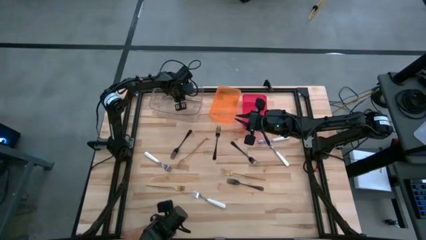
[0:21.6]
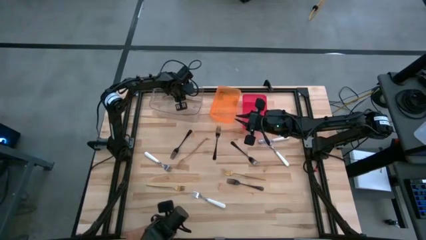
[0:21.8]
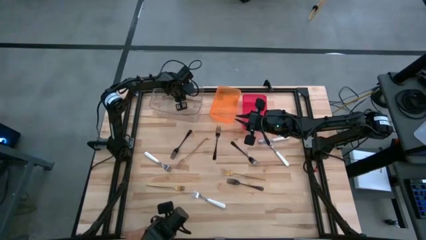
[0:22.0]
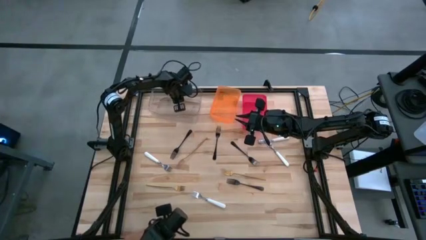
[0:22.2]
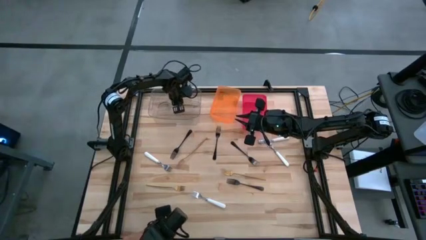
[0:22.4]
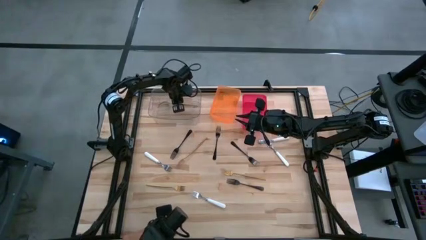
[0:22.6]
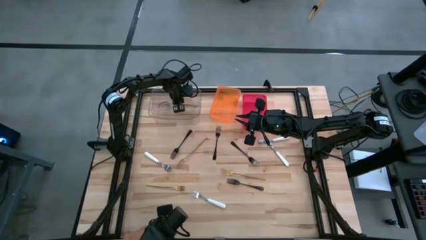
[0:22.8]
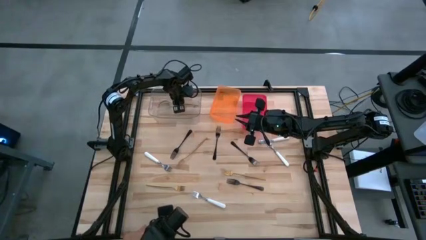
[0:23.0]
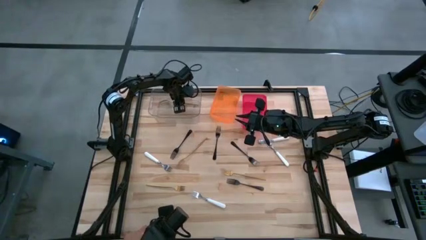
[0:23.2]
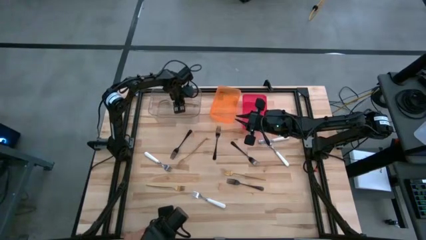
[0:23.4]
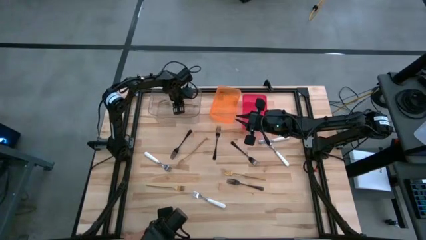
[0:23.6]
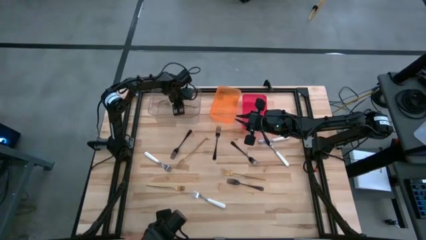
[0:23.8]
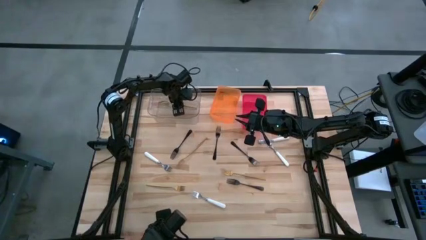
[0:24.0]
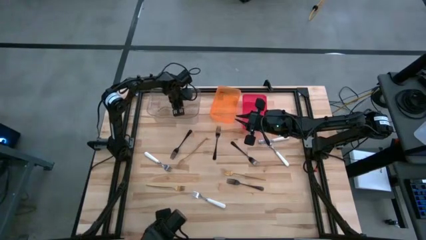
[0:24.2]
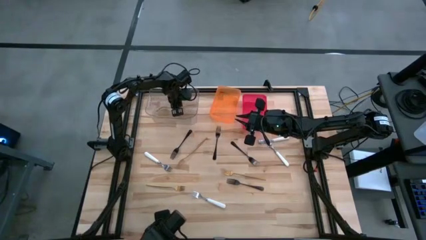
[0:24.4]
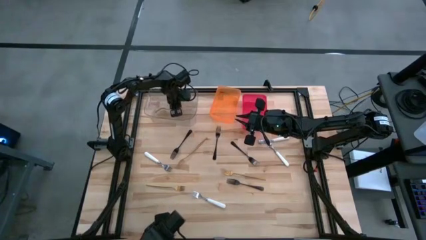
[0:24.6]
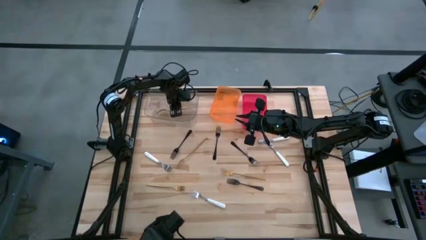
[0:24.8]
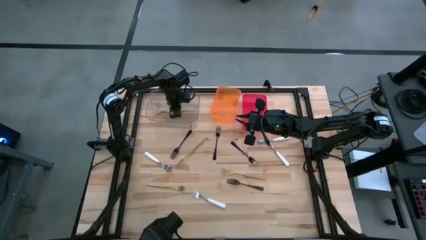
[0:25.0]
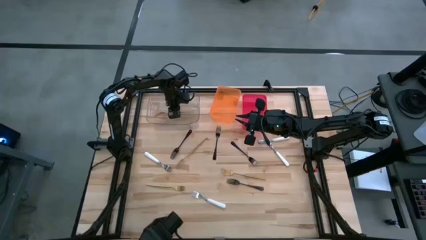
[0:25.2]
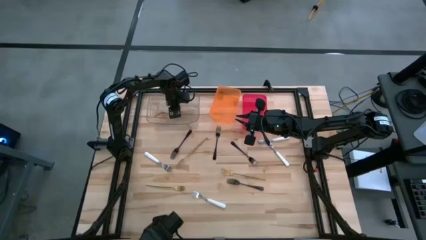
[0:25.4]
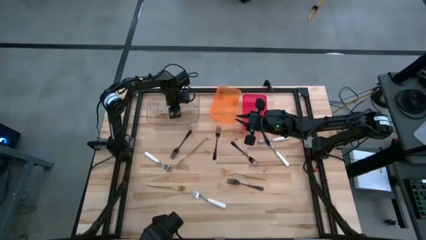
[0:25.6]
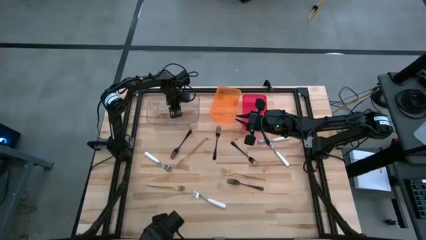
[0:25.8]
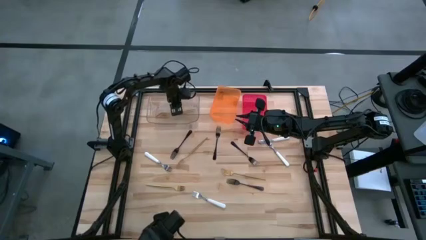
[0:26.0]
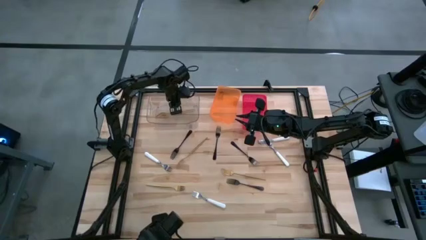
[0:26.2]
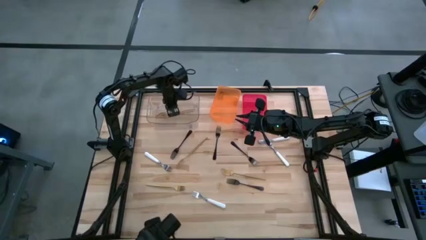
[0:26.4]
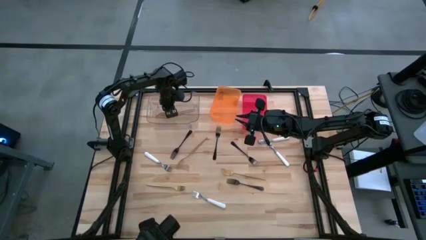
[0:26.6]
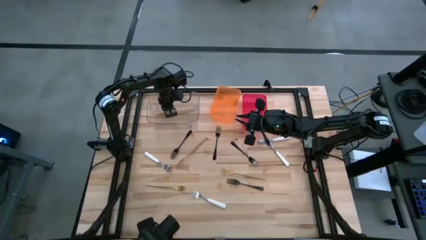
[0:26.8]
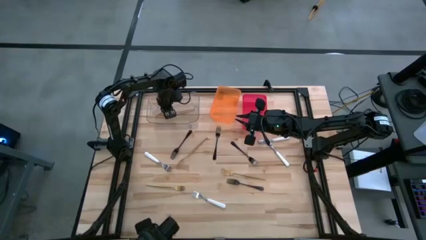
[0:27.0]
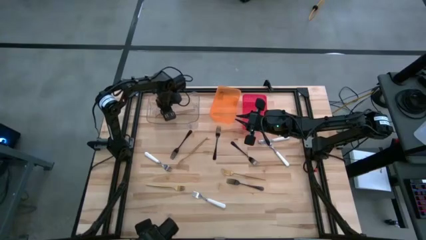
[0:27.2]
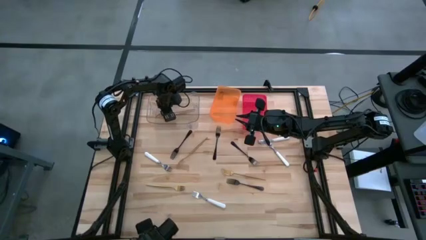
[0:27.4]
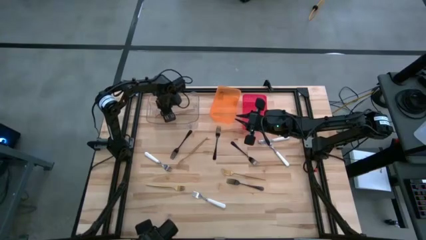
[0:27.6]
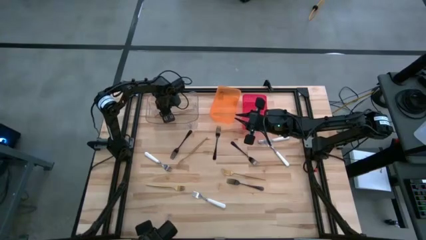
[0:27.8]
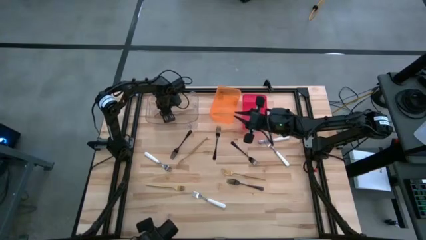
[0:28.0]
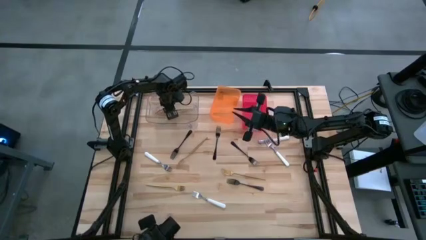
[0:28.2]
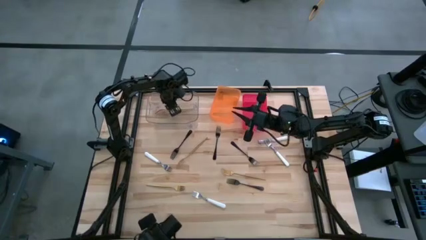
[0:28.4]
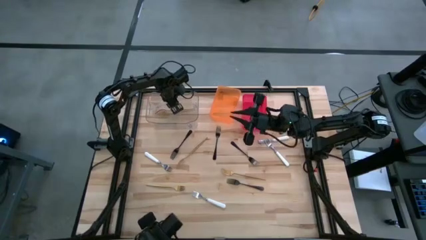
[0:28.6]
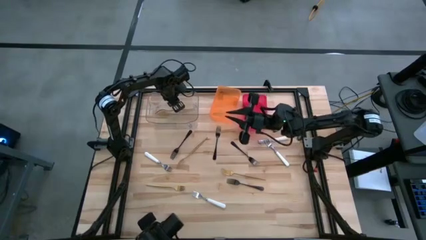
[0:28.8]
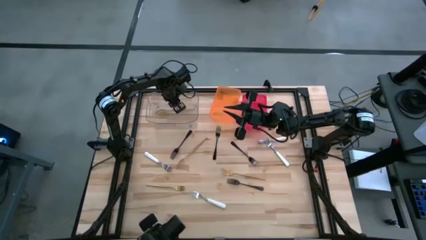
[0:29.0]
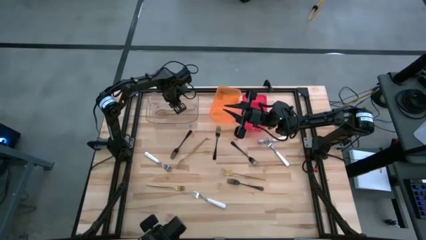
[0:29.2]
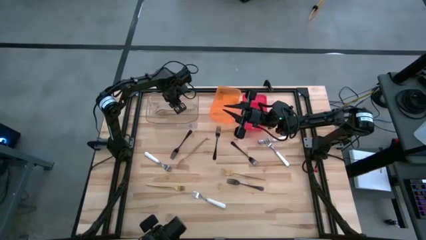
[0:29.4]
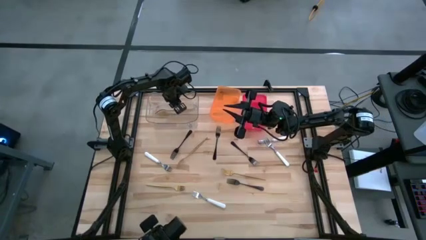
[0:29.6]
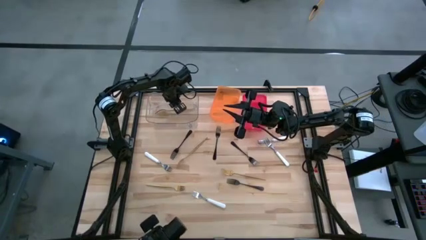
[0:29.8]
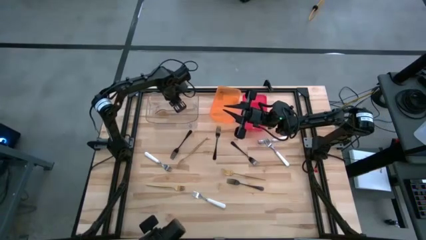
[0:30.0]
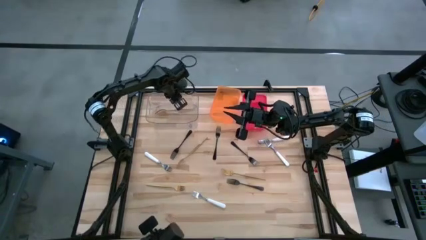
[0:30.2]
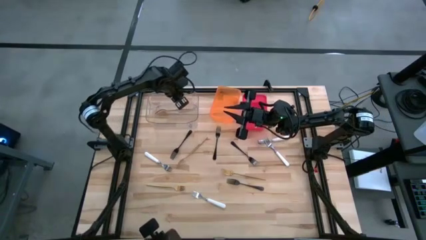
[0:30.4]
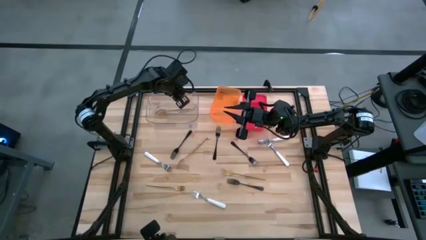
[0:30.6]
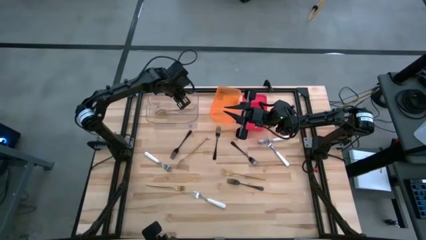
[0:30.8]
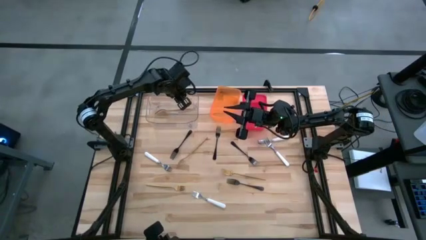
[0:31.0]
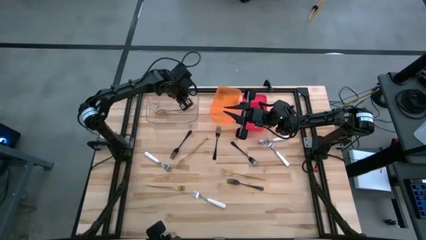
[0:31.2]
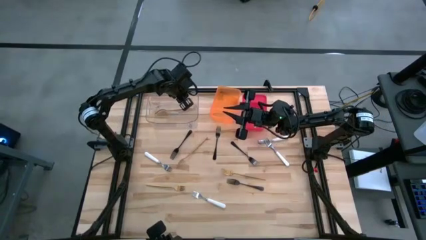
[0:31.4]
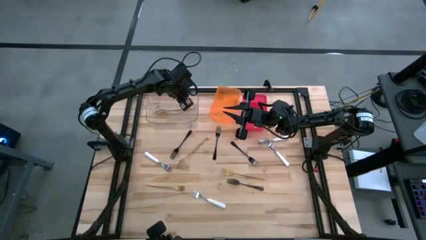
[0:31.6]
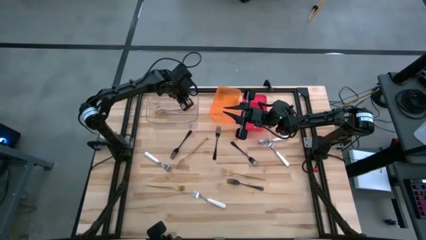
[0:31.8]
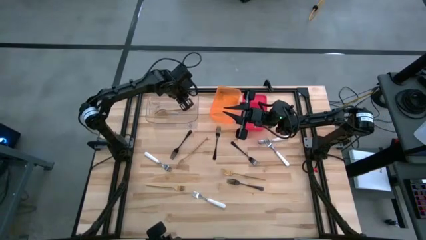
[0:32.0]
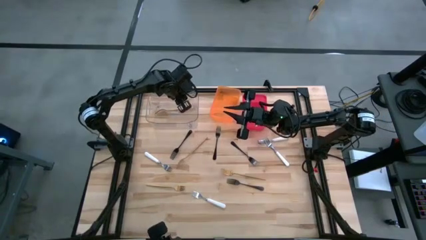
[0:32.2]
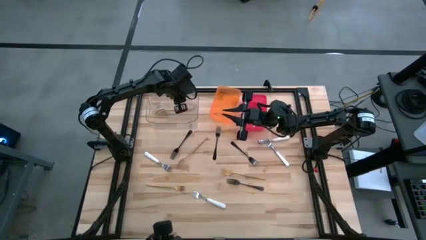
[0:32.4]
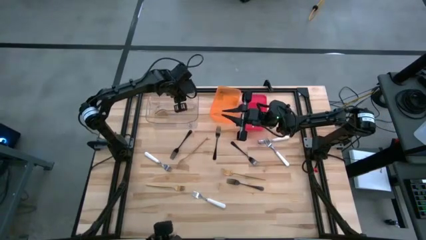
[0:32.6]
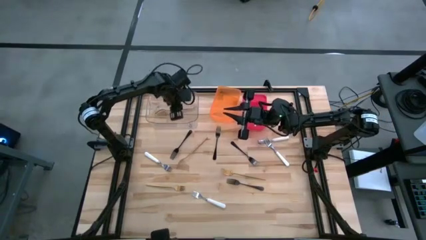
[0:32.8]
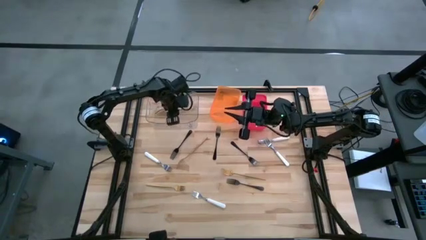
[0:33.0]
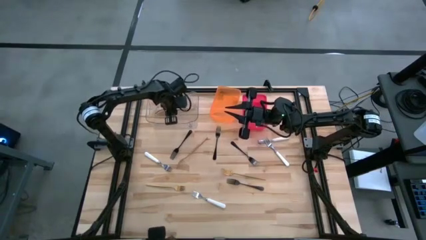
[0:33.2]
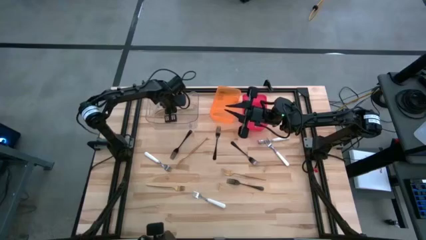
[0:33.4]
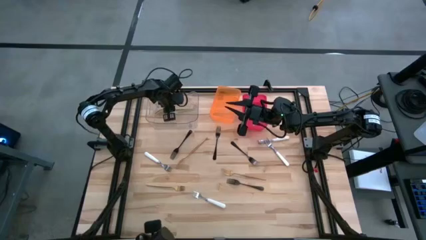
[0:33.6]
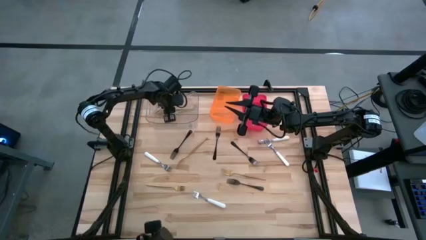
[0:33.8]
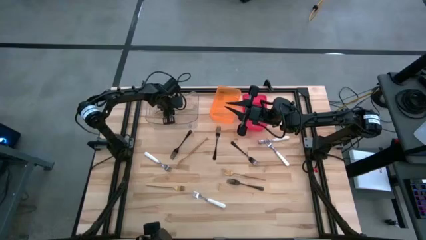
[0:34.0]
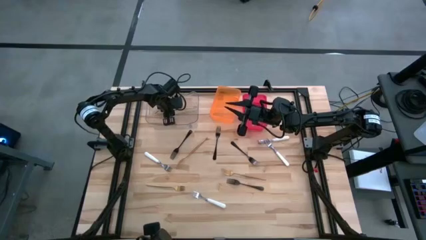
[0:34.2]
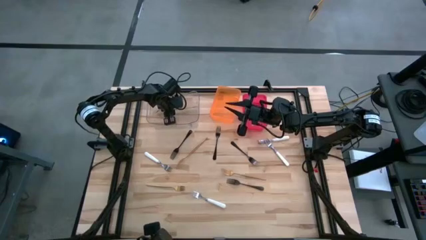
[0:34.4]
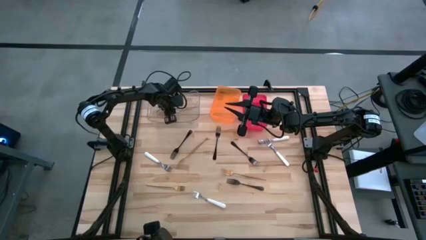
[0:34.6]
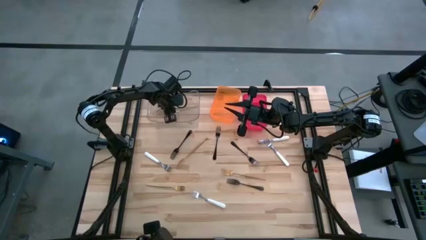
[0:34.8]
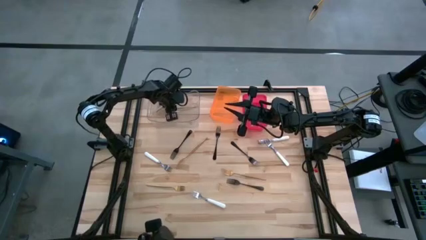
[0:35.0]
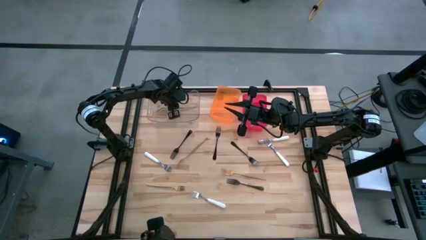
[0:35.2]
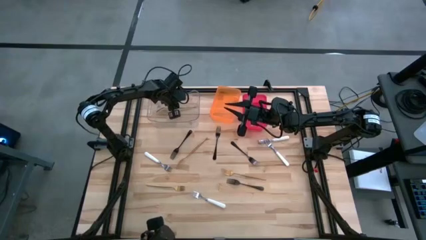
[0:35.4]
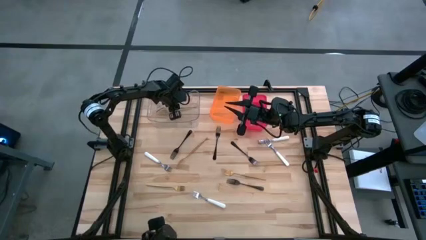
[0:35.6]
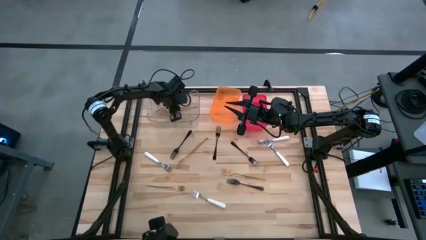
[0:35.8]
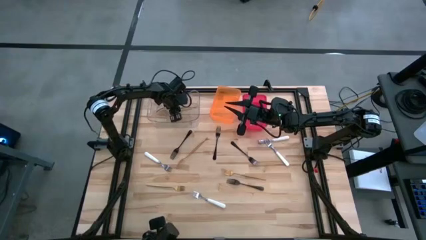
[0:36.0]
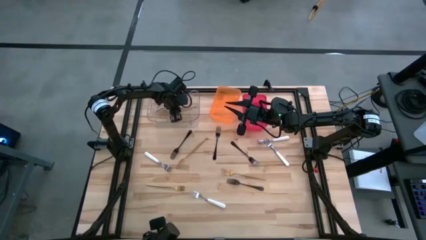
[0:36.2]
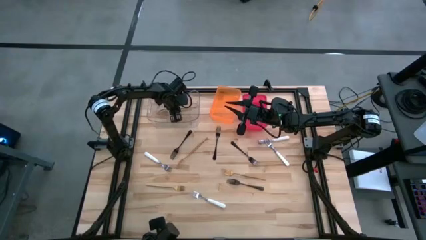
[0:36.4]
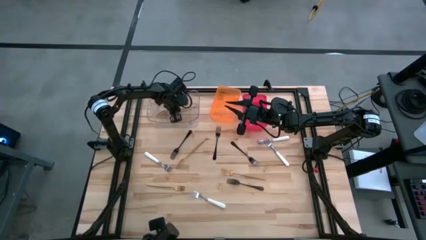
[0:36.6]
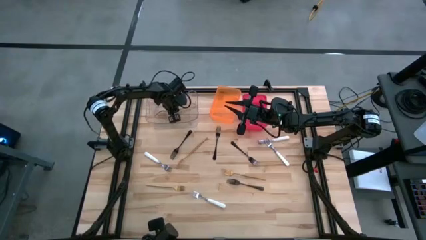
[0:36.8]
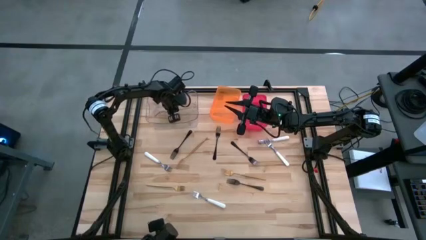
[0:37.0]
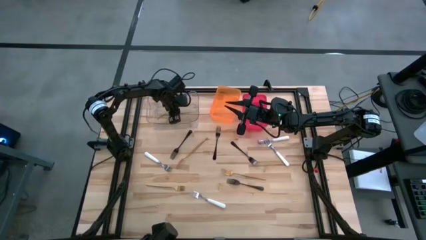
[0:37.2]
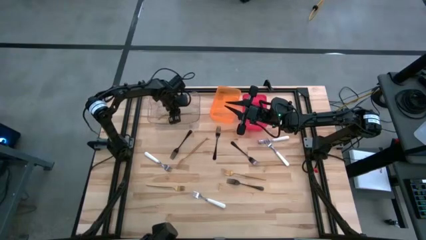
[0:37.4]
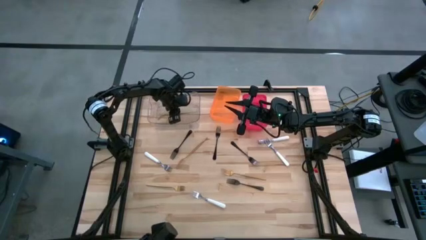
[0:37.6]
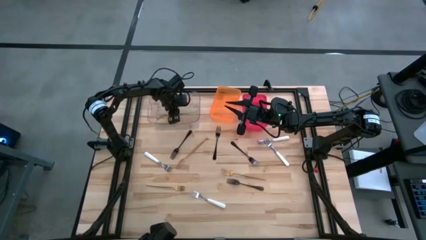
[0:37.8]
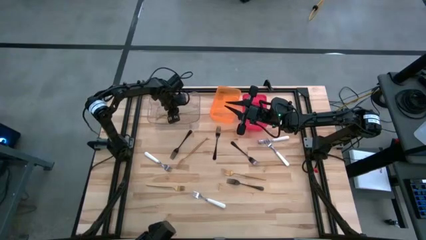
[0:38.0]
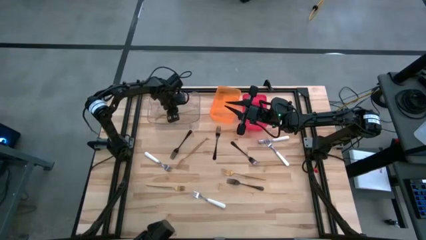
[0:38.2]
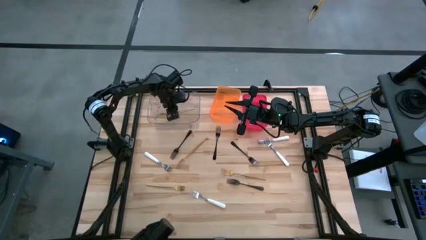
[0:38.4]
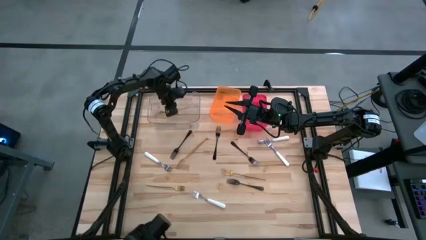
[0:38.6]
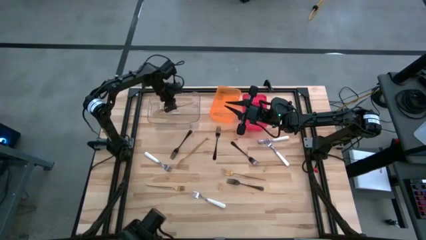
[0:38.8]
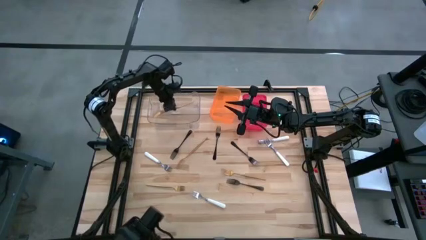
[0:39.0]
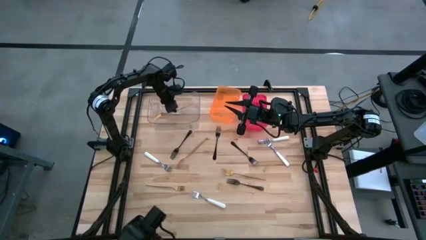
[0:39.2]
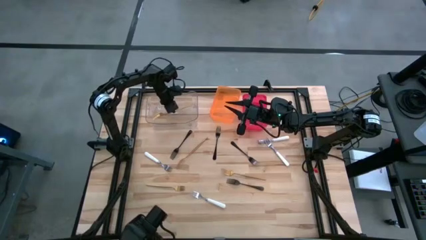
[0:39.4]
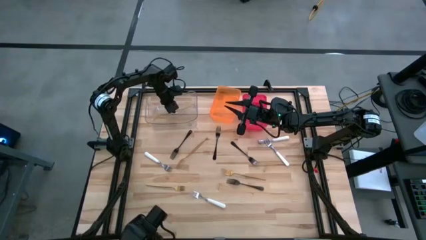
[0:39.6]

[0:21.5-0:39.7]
Task: Sort silverware by color (type)
Put the gold fork into the transparent bin
